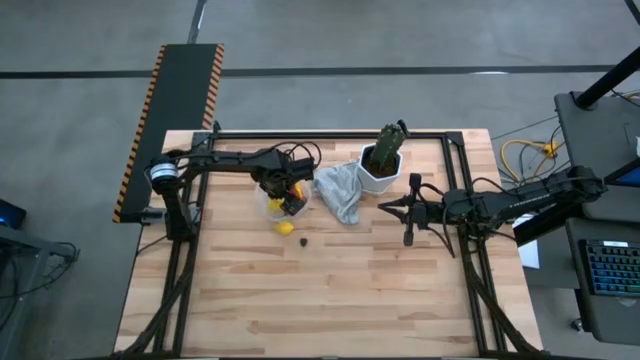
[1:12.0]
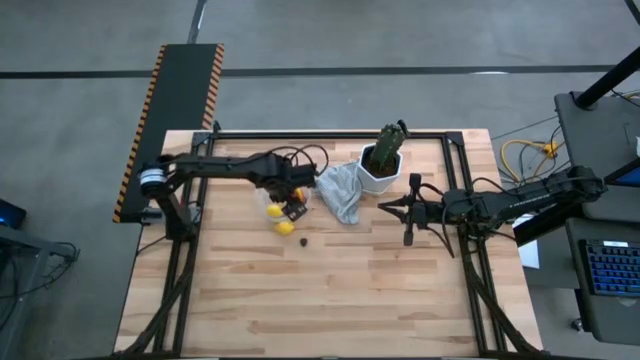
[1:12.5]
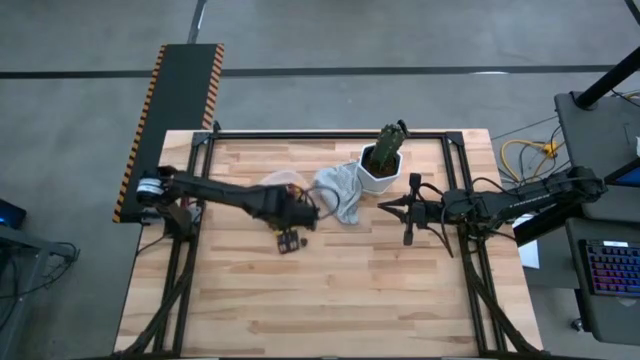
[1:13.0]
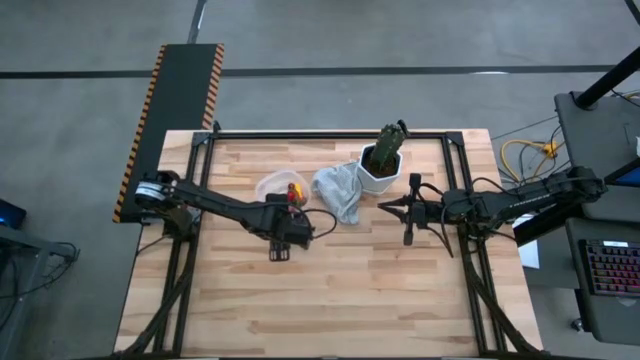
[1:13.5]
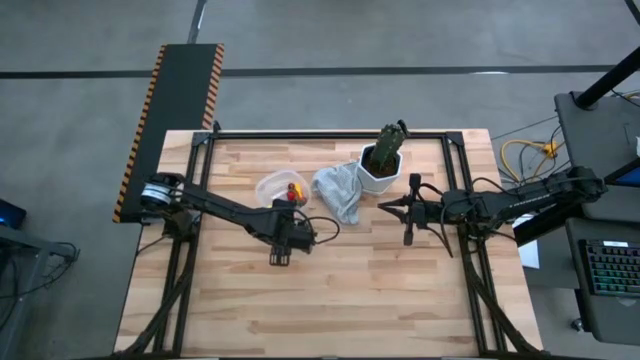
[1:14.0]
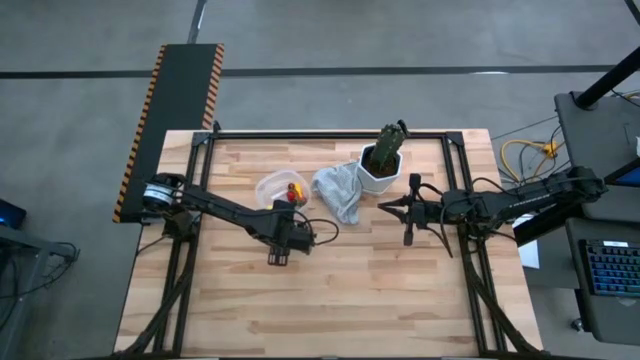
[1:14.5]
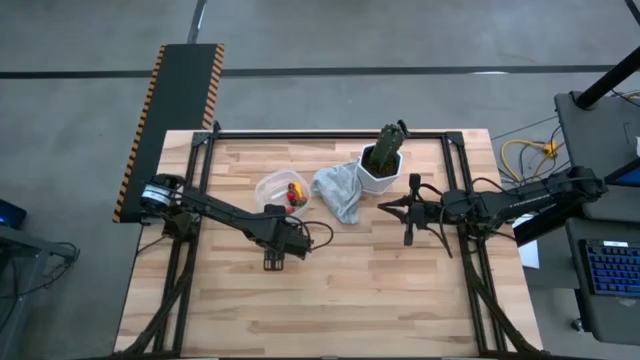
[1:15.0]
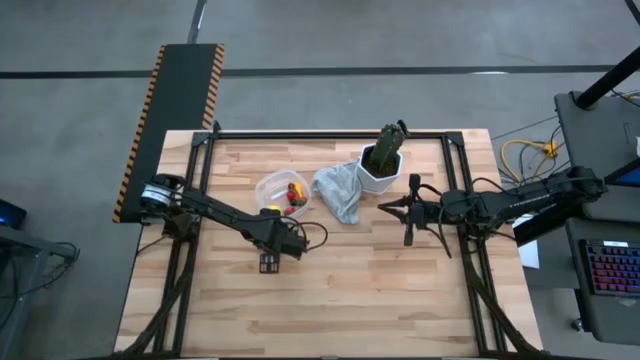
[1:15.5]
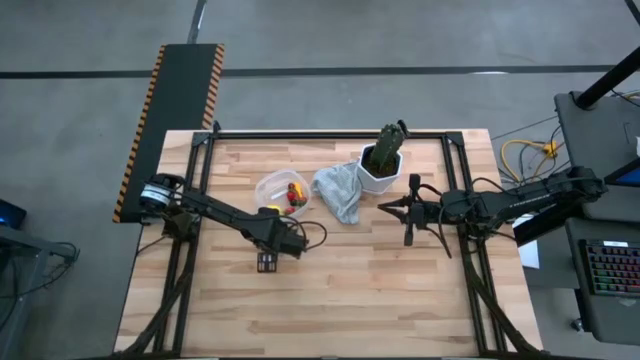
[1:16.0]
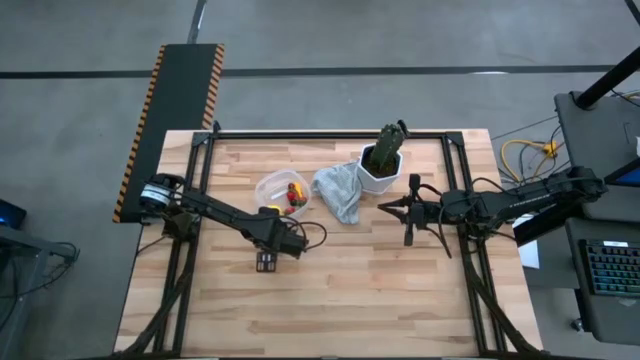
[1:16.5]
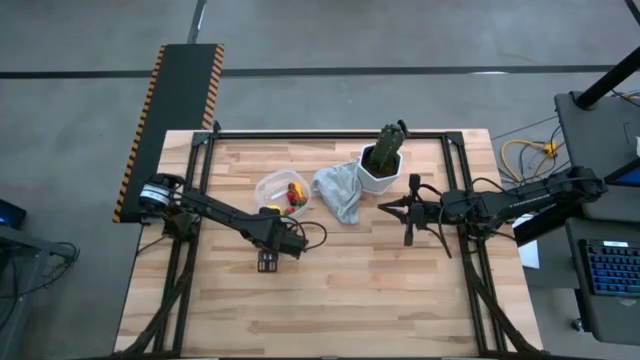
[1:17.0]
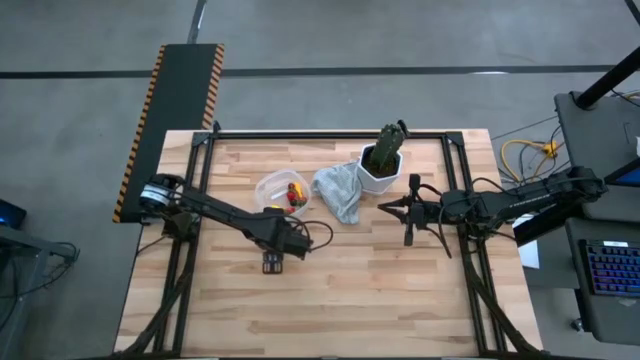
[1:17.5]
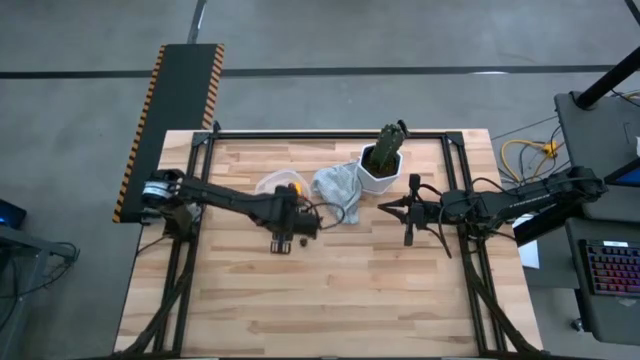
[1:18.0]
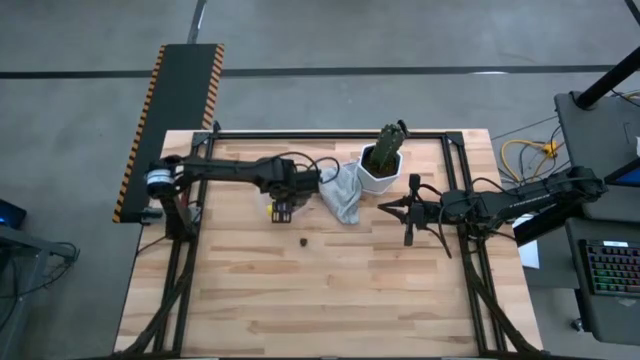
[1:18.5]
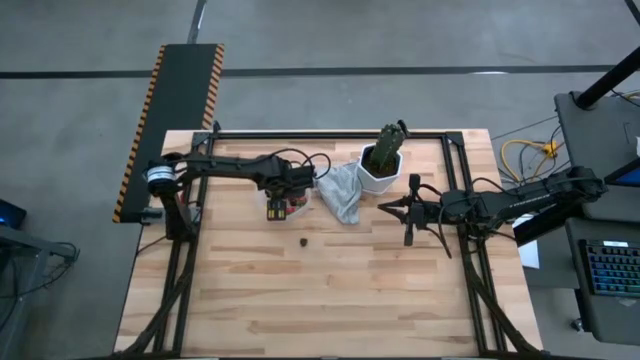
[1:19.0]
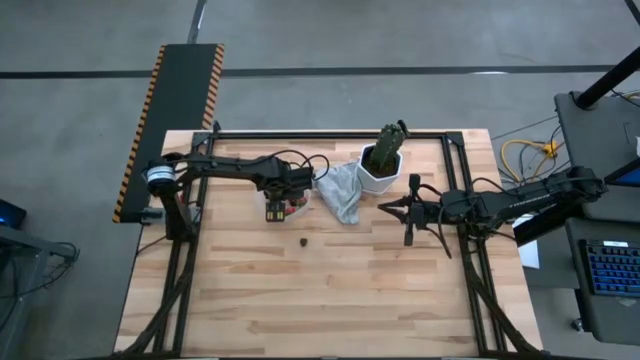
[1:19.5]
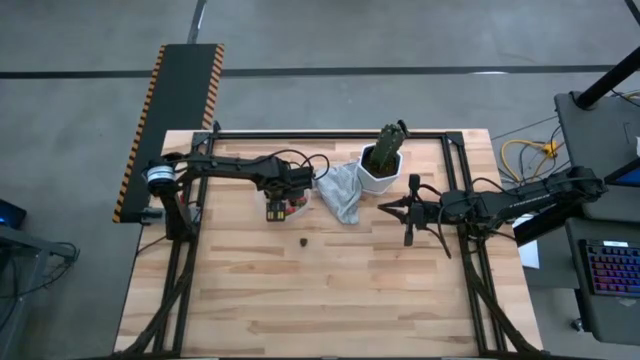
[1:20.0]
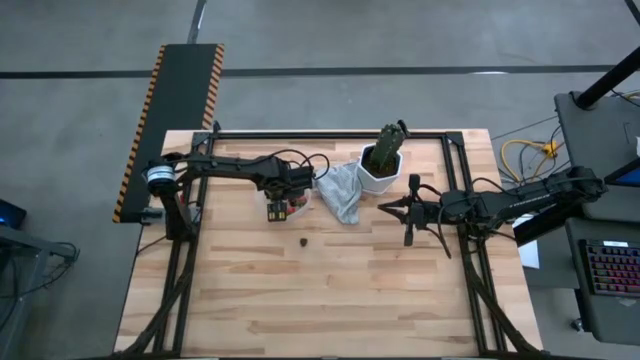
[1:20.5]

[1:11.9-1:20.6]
Task: Pick and placing Produce into tupperware
Put the yellow lemon into the transparent container

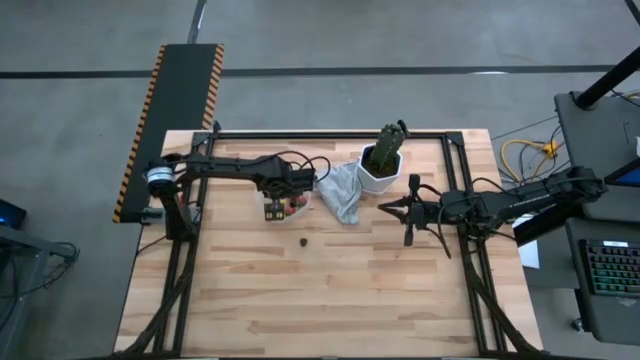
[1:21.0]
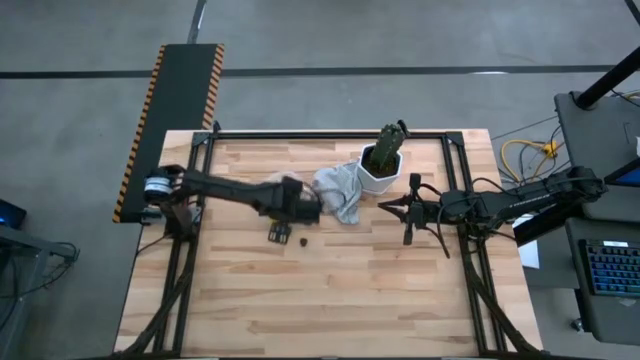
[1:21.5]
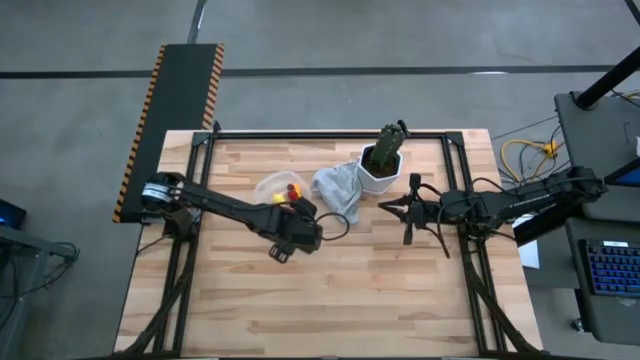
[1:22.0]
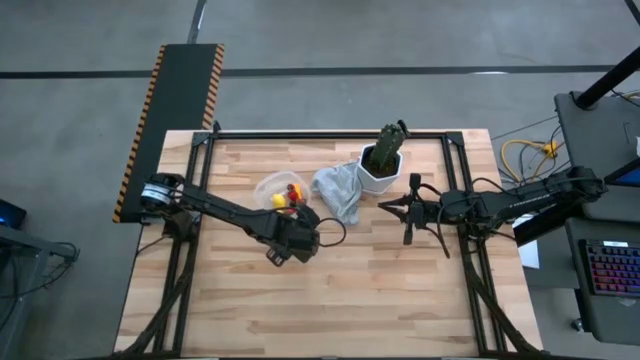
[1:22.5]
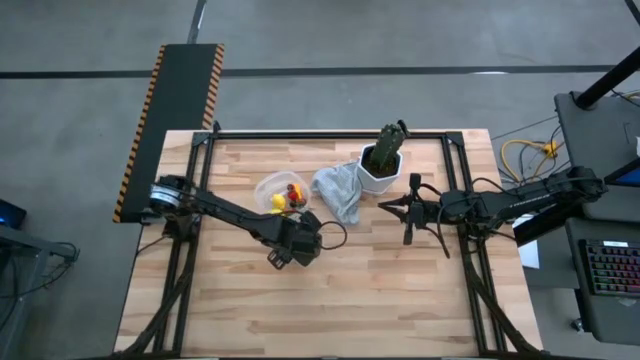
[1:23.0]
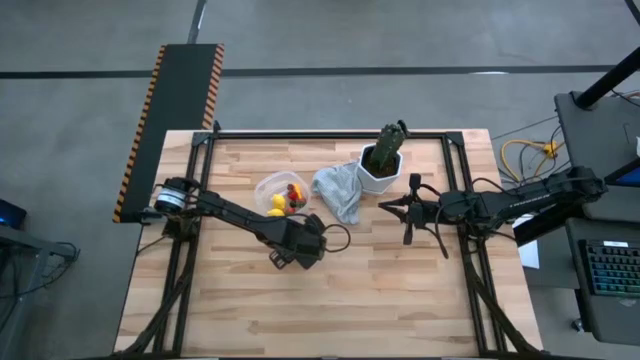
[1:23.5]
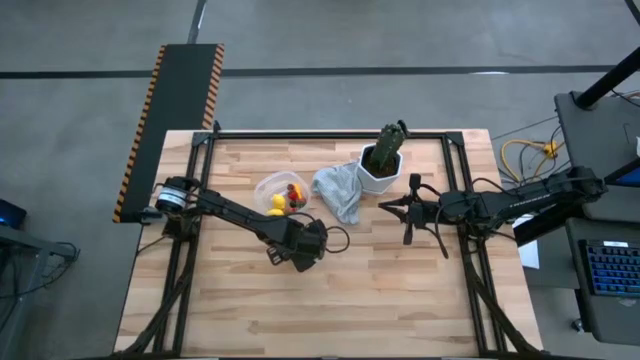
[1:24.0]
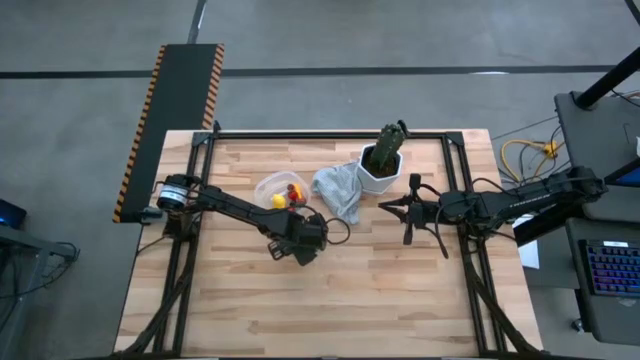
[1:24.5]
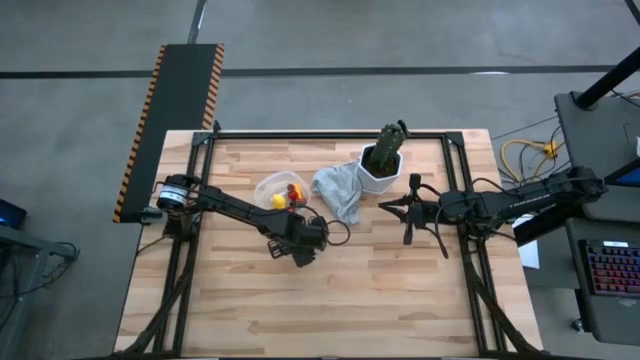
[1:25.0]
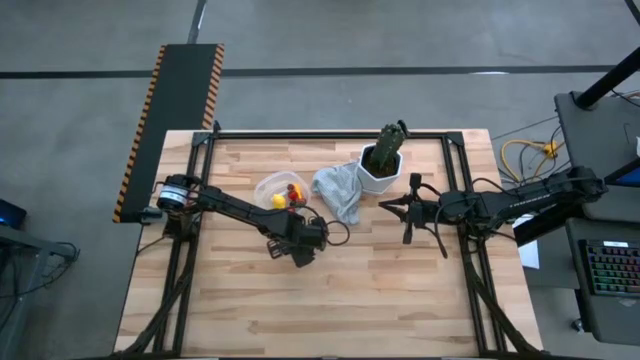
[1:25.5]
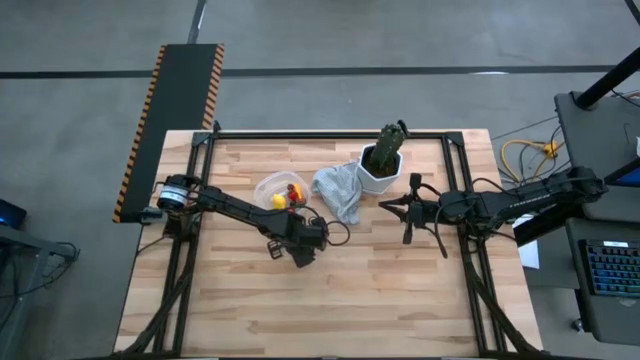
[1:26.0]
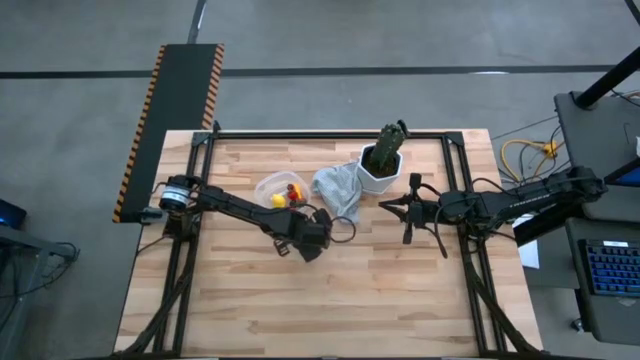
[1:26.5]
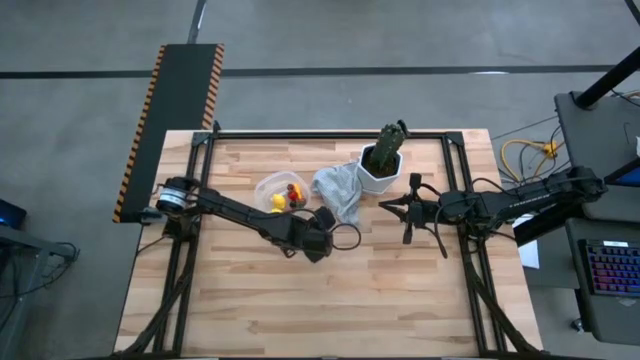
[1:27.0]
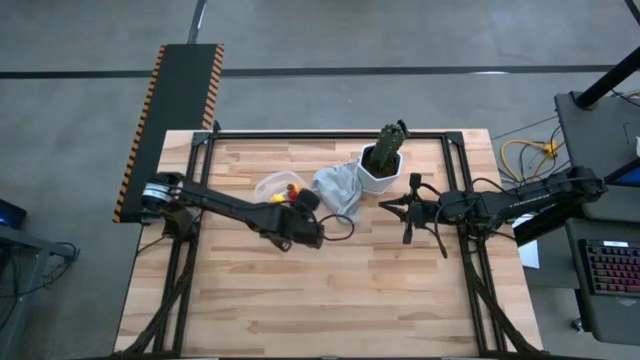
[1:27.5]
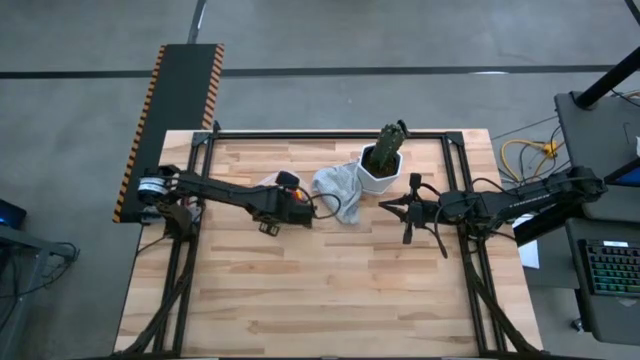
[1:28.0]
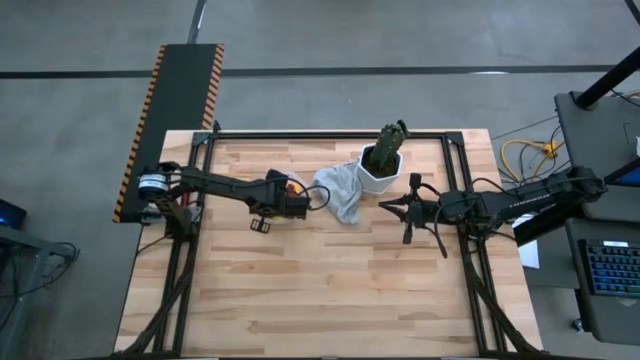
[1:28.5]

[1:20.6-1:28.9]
Put the blackberry into the transparent container

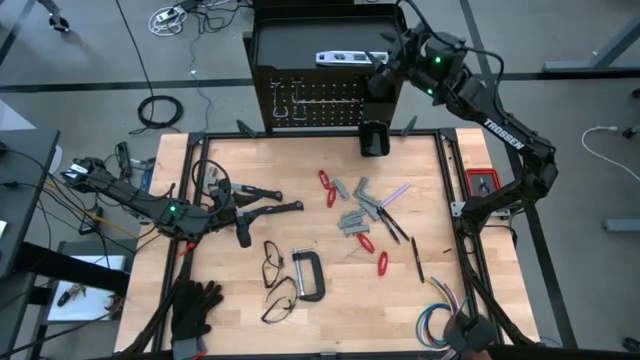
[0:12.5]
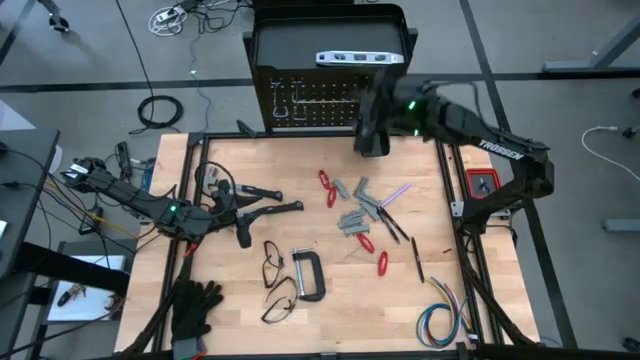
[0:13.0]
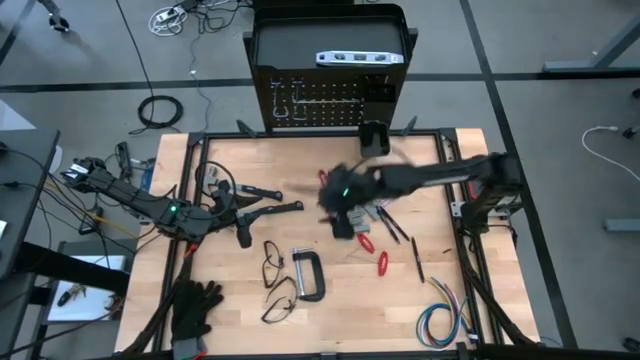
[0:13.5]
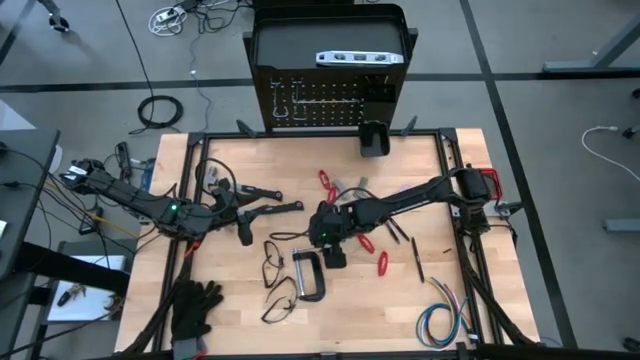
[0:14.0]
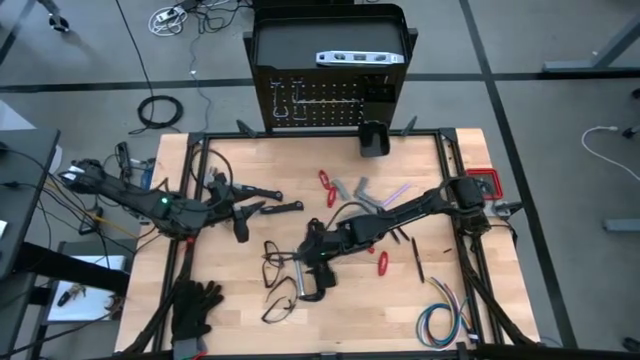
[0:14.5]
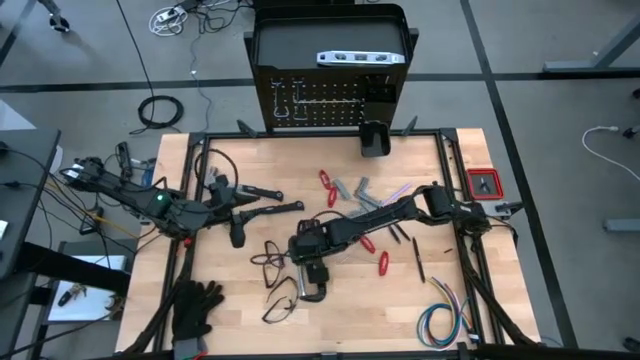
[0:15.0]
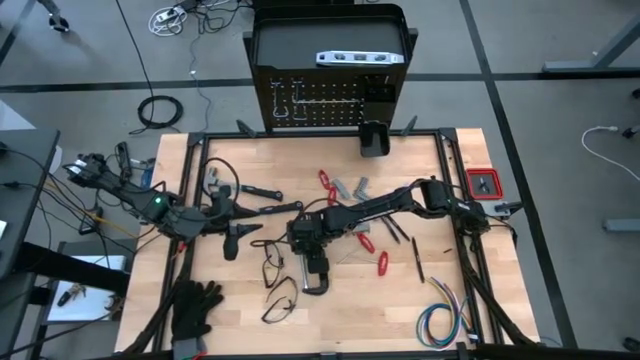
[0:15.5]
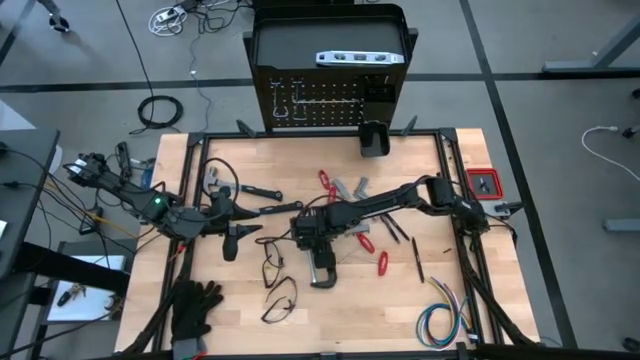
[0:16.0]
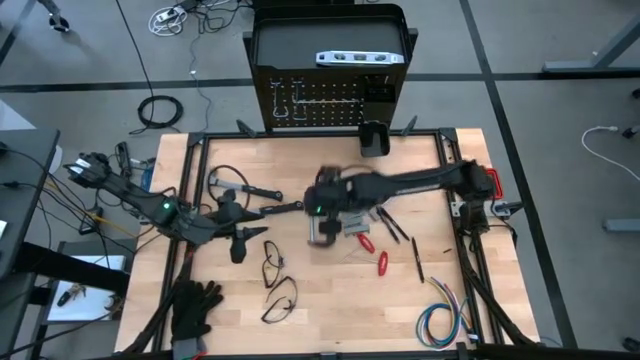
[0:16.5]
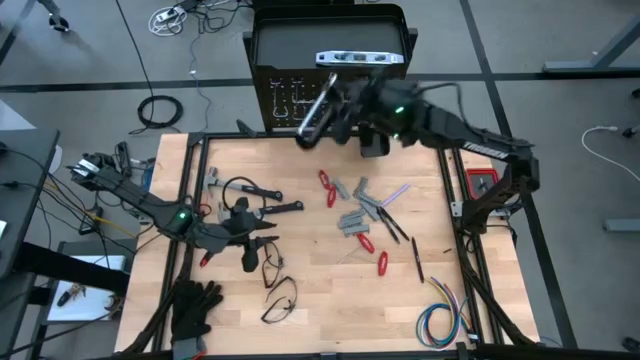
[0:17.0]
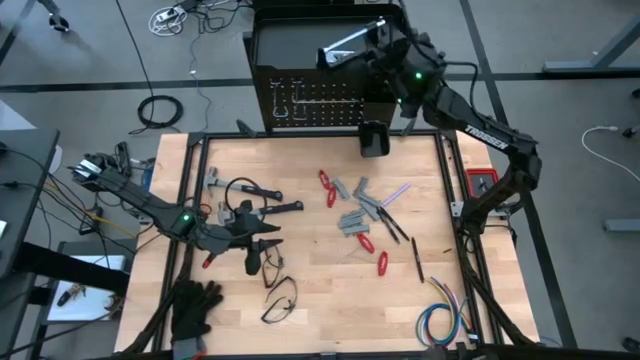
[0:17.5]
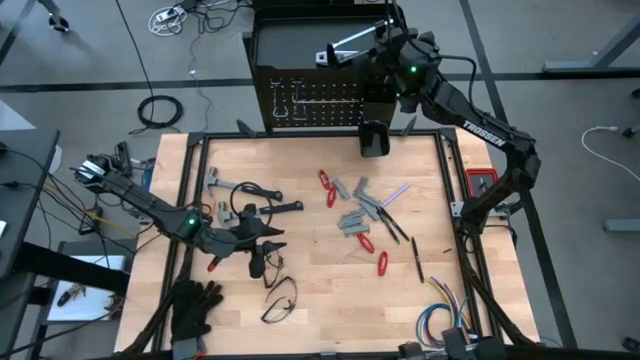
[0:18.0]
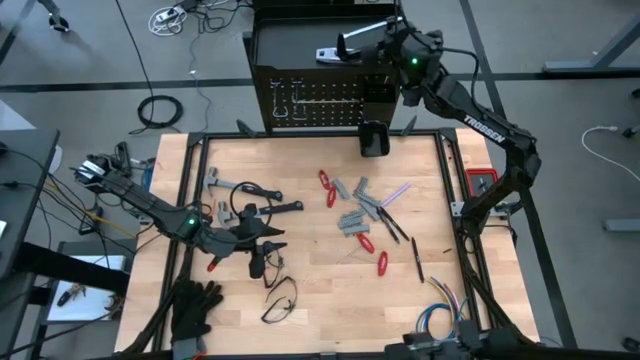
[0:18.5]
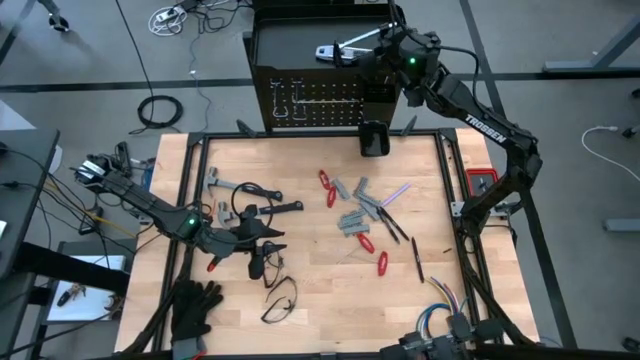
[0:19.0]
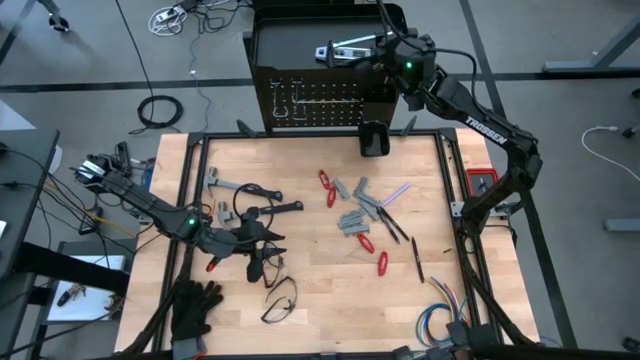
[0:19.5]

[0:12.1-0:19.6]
Task: Hang tools onto peg board
Put the C-clamp on the top of the pegboard
